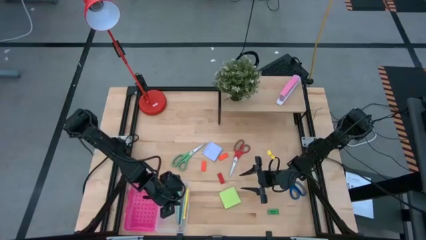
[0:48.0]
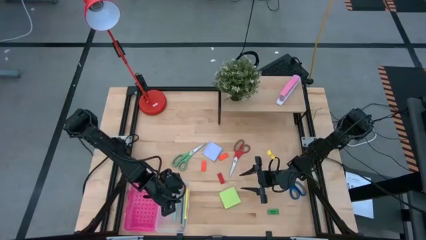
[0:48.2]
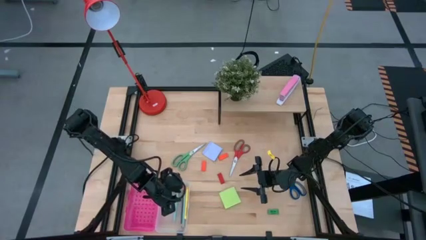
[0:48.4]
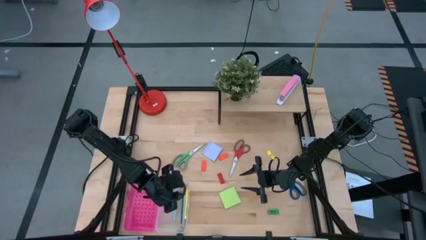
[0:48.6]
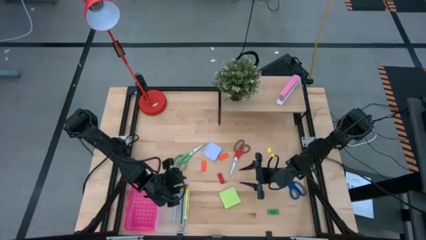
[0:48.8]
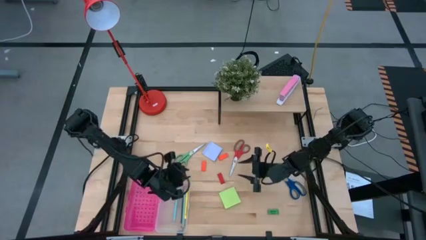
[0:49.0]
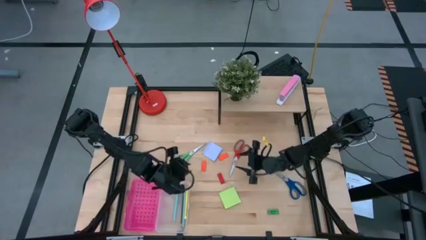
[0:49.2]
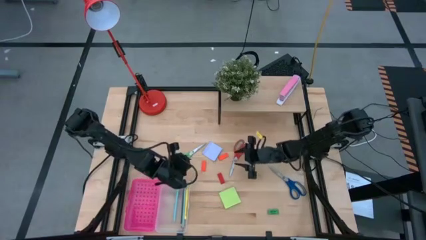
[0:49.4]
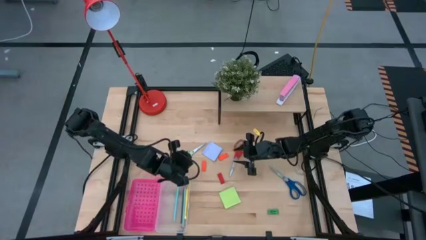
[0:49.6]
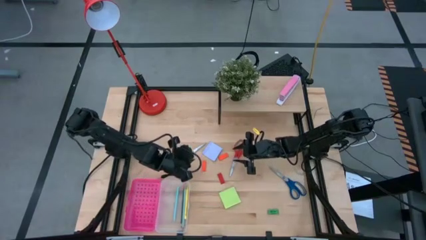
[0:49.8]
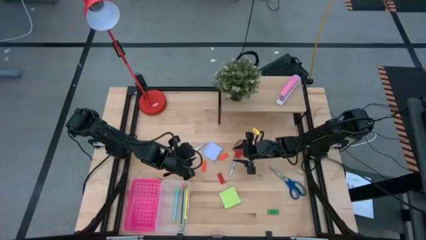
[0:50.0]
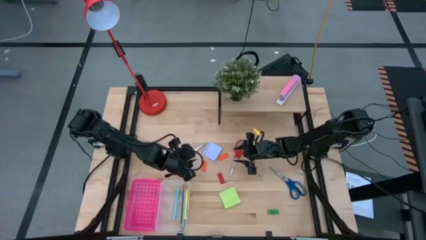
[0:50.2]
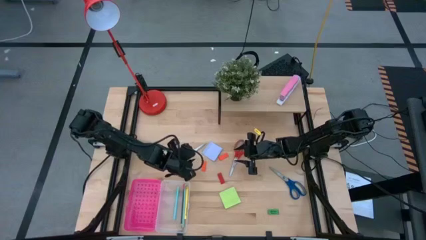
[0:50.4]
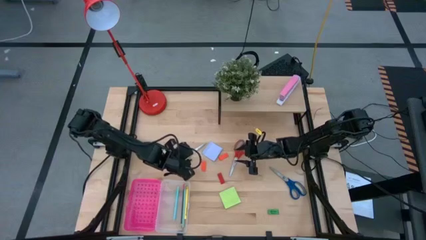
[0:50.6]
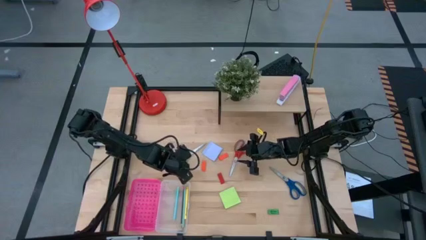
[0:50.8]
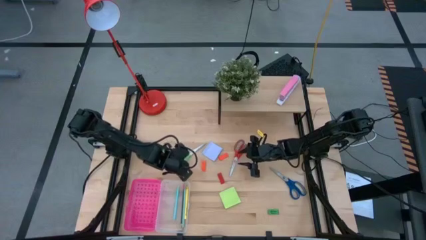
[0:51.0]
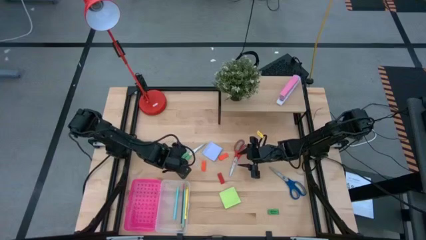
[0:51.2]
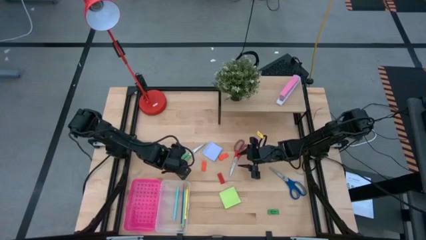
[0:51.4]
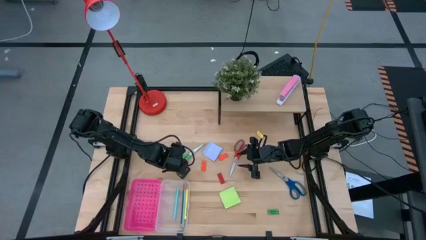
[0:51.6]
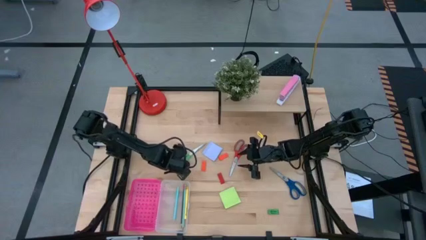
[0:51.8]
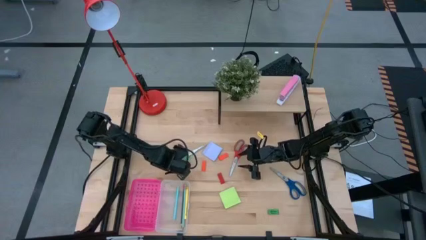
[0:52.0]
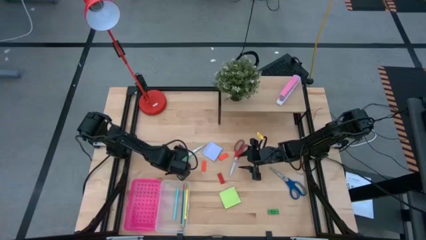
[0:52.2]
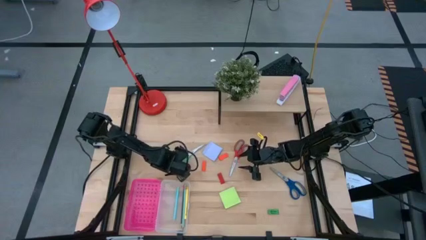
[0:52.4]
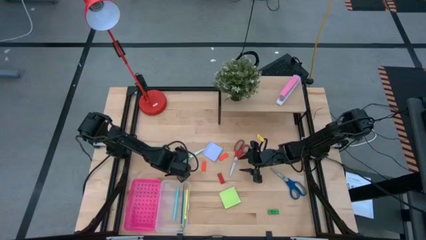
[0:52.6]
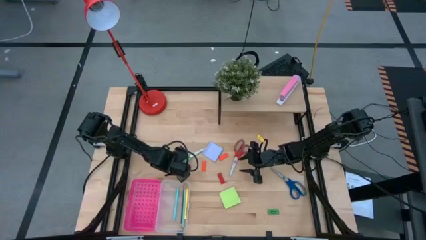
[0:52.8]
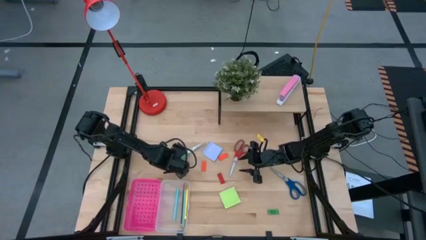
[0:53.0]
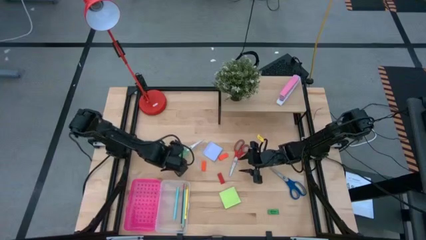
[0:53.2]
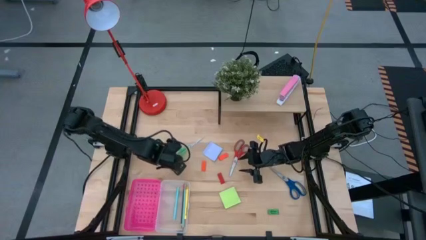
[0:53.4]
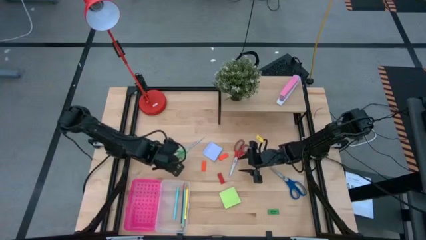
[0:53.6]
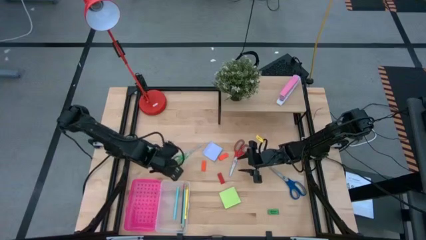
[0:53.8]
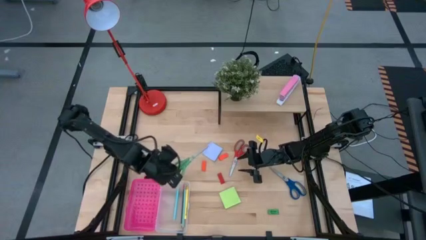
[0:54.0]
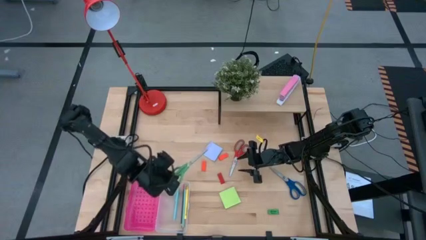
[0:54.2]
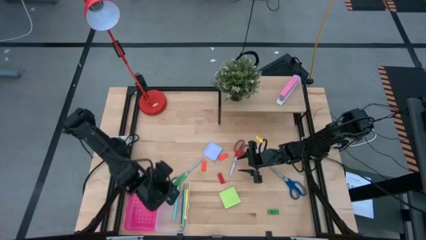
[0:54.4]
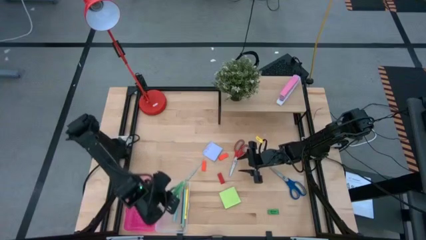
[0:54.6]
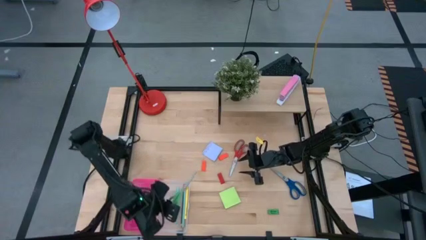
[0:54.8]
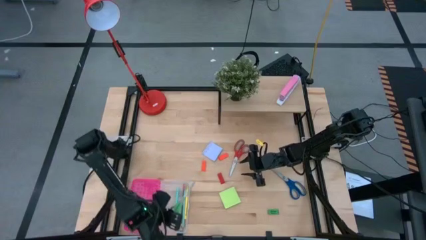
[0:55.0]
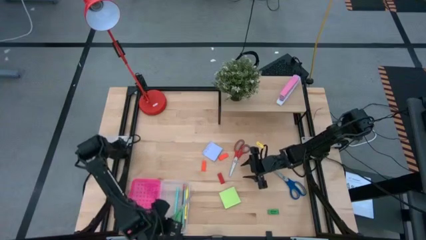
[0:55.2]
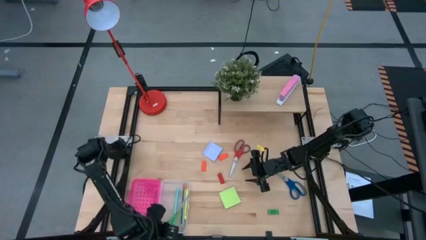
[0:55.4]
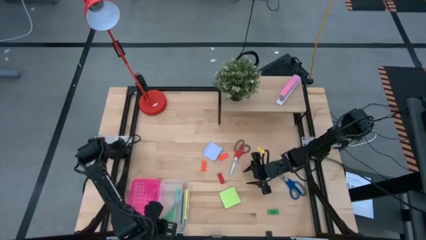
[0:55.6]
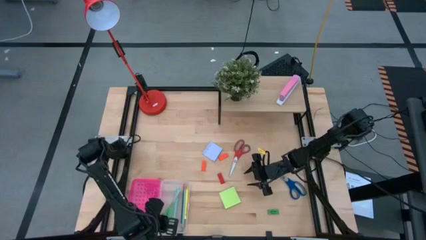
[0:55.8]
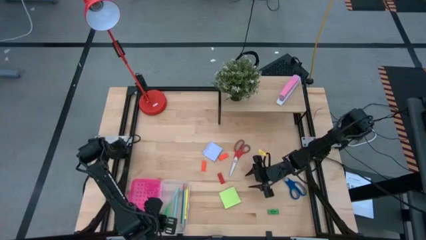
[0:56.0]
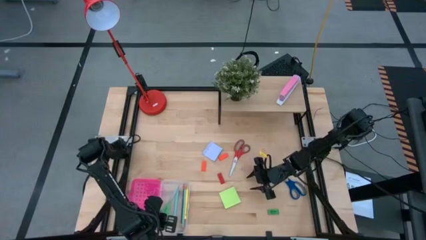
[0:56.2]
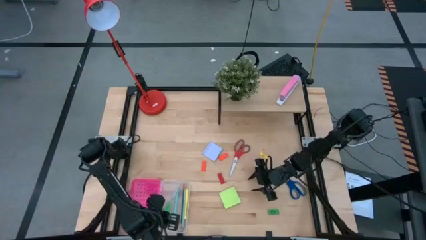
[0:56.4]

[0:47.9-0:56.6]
Task: Pack school essentials
Put the light green scissors into the pink supply box

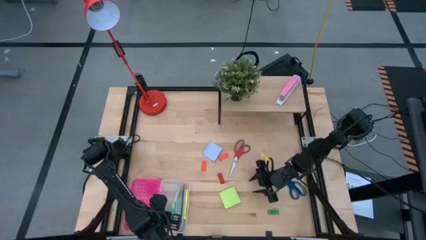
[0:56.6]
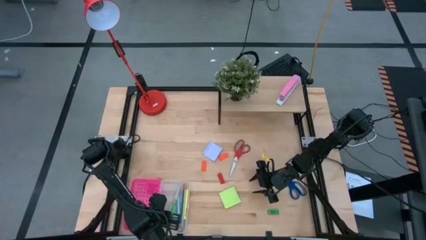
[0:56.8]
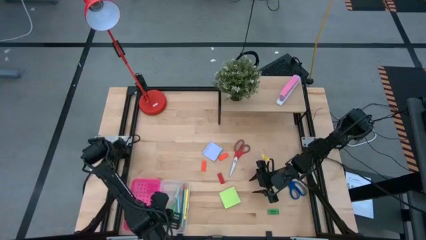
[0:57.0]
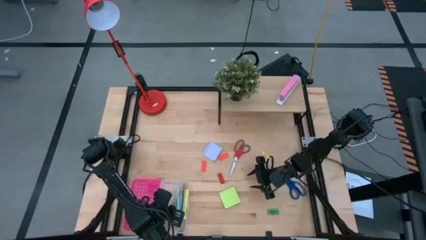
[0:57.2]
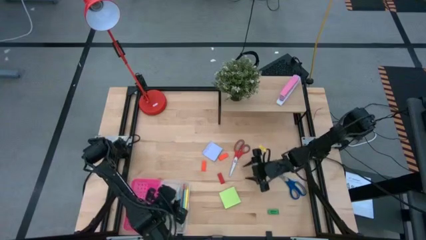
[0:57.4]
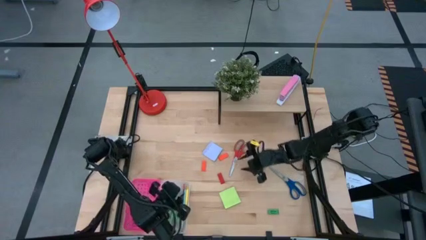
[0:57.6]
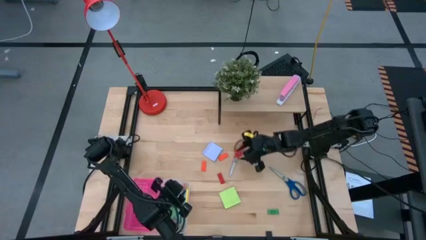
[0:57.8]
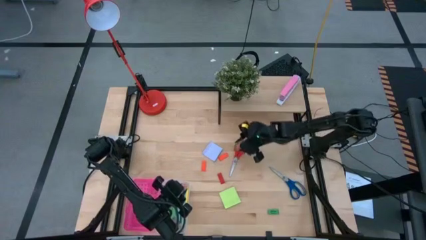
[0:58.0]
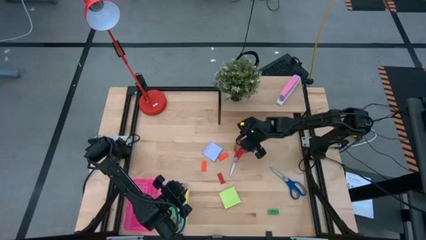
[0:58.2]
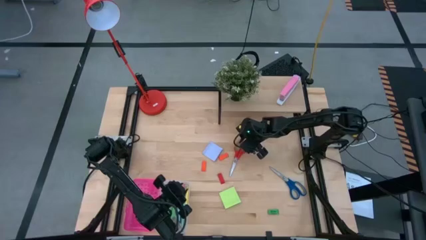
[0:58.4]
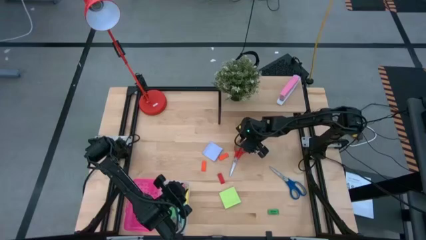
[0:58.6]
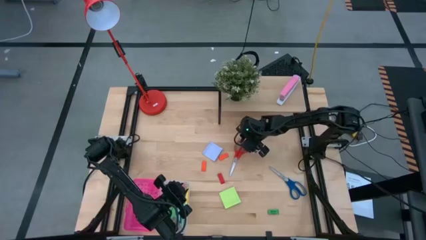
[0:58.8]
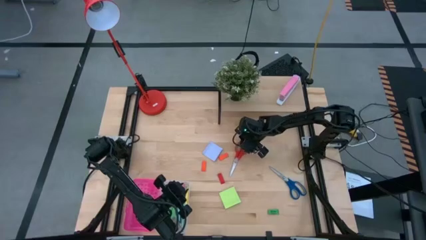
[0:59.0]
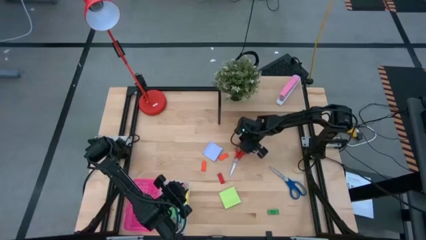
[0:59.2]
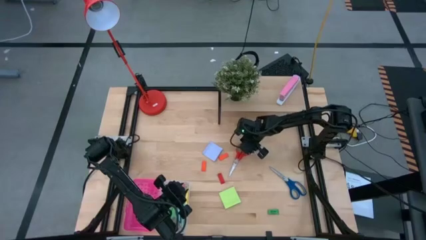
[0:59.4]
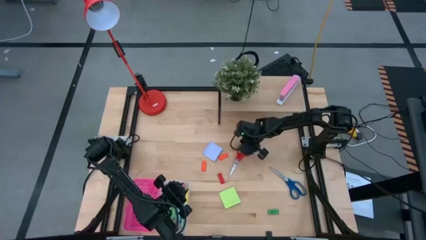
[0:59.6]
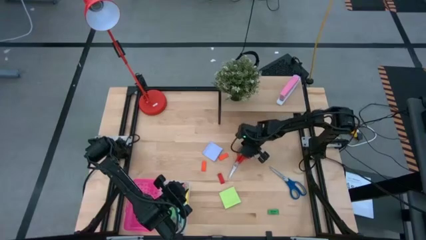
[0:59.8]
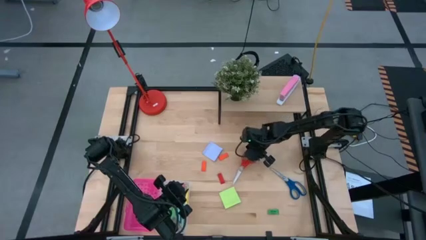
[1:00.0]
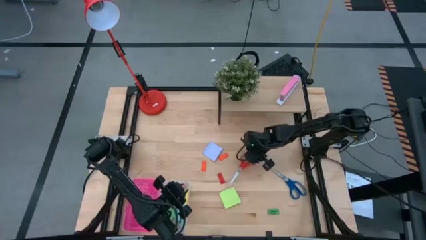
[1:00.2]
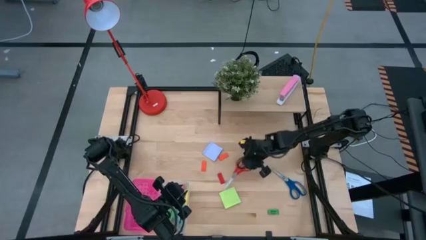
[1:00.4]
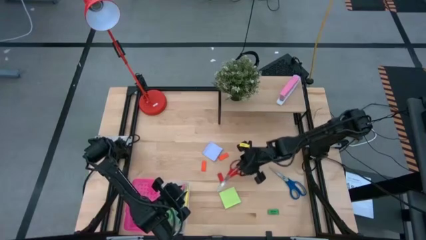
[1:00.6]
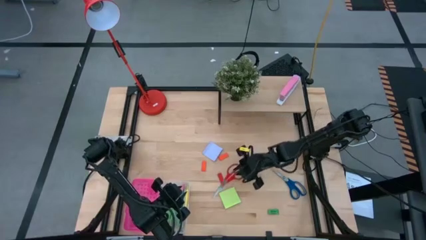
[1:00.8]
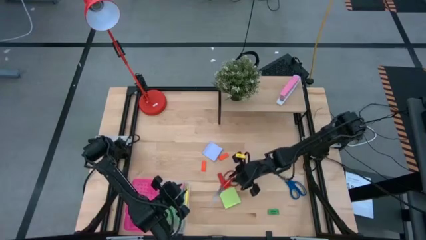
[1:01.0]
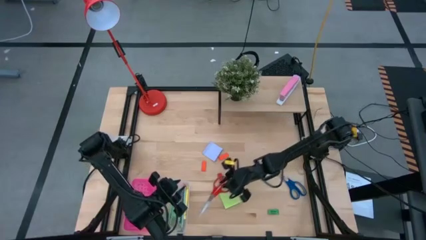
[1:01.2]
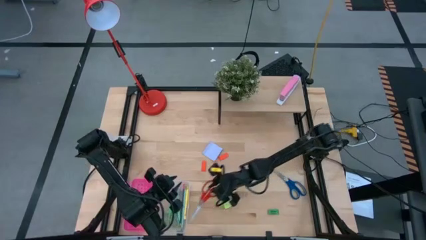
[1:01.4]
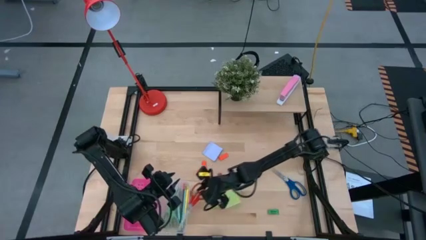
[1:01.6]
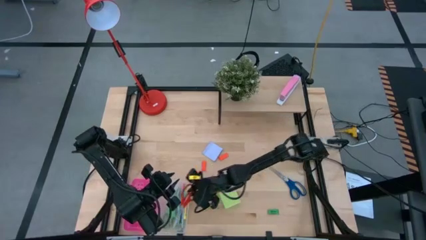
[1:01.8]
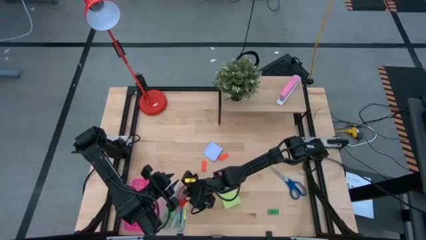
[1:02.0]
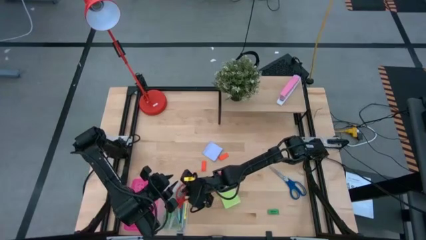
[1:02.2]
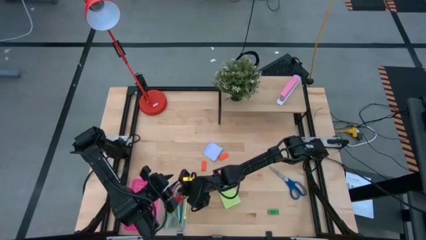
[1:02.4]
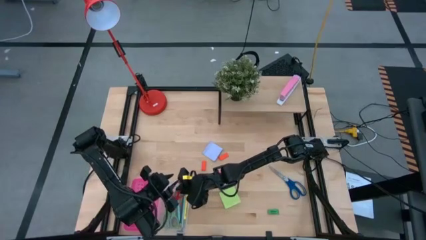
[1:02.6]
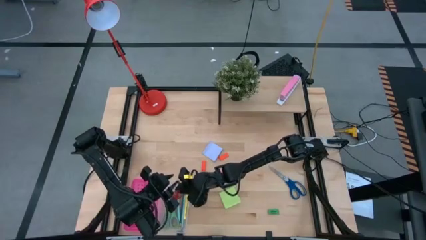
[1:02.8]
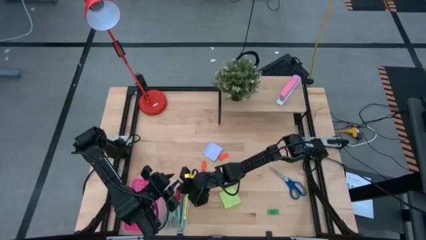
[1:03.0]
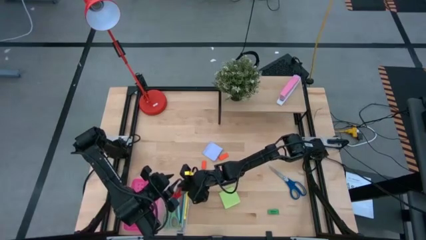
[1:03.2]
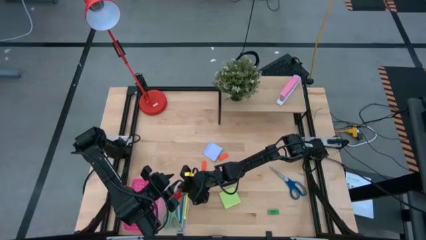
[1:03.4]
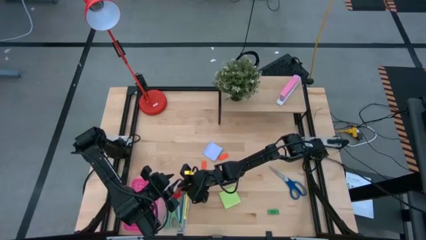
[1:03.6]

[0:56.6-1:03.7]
Put the red scissors into the pink supply box

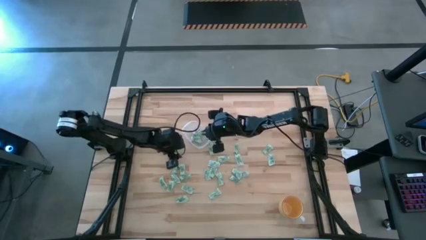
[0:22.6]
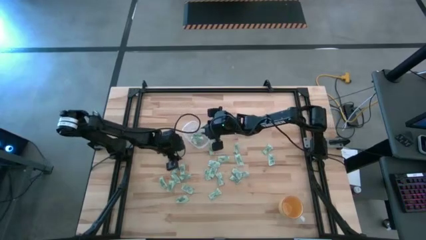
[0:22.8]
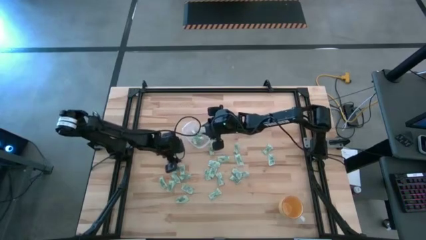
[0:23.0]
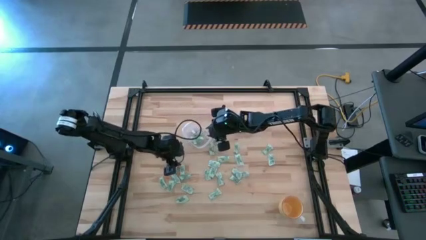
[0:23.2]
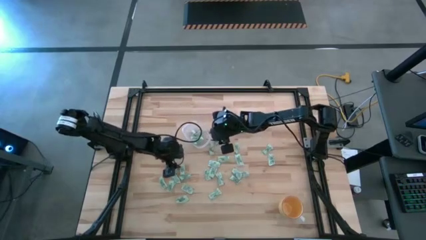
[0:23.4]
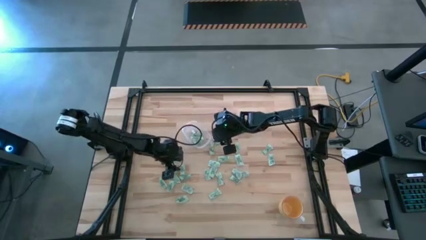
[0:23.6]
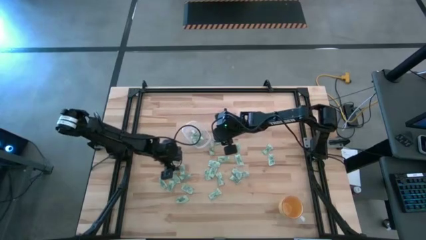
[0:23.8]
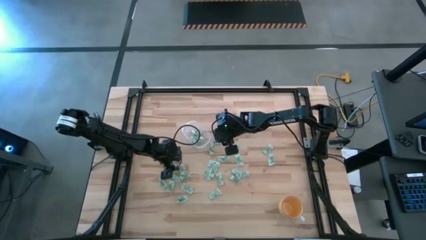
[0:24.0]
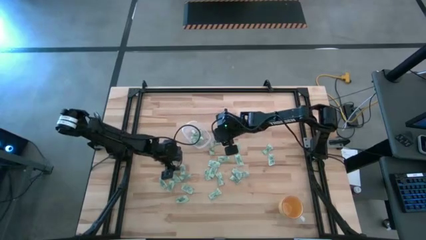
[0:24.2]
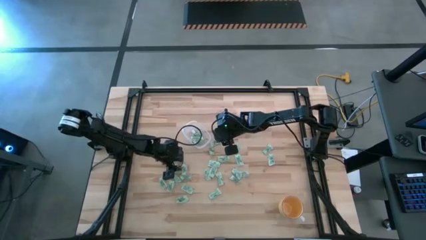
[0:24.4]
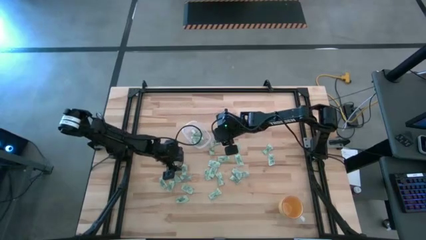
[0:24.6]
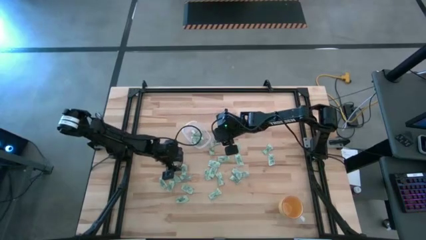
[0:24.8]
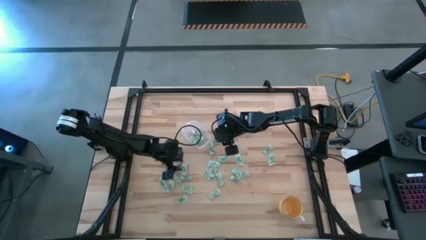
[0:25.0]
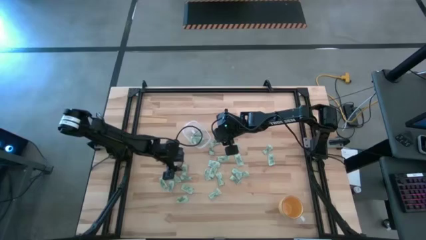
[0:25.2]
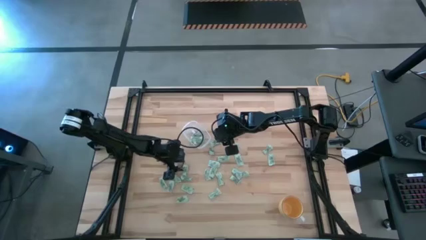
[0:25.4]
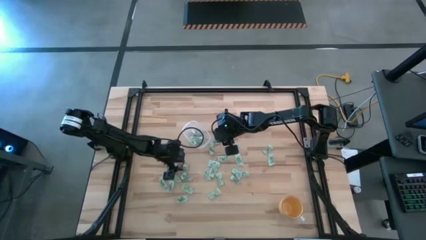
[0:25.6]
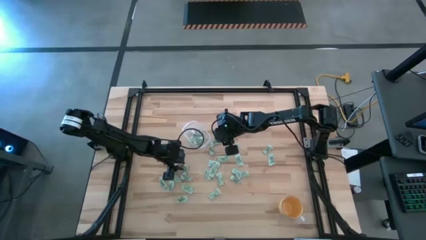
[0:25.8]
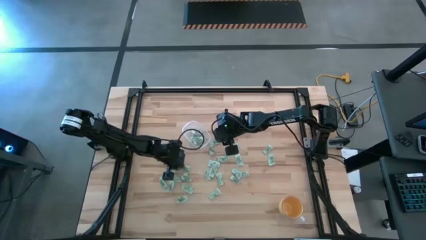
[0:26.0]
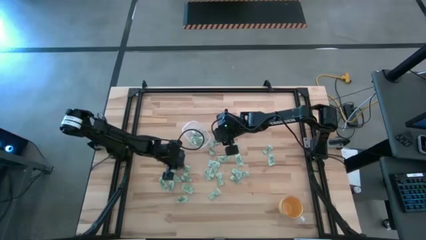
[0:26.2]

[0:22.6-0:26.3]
Task: Pick and place Stevia / Truvia into bins
Put the stevia packet into the transparent bin
